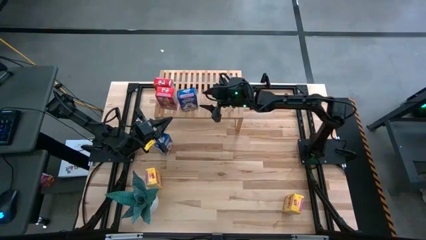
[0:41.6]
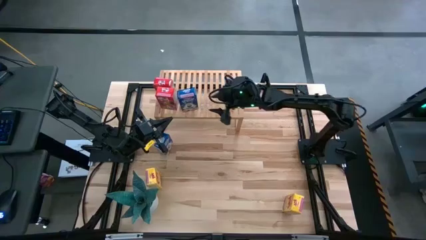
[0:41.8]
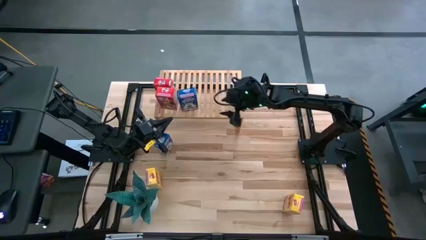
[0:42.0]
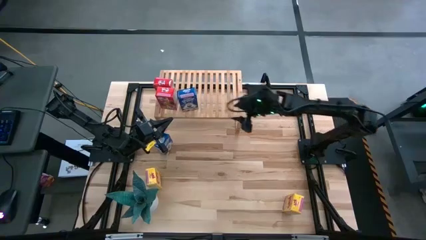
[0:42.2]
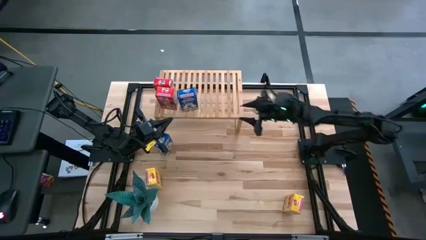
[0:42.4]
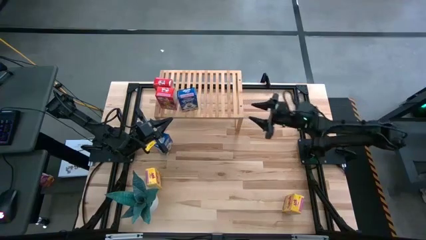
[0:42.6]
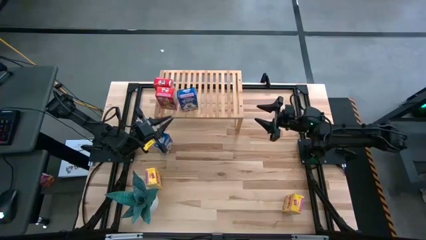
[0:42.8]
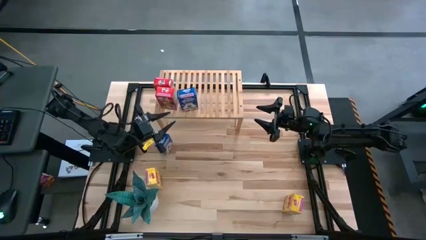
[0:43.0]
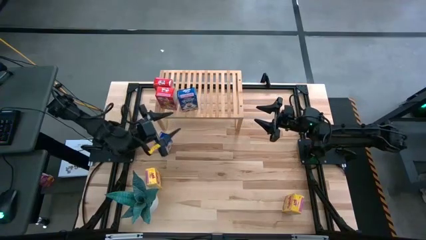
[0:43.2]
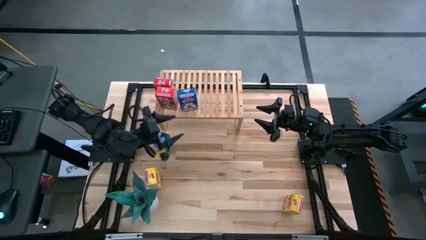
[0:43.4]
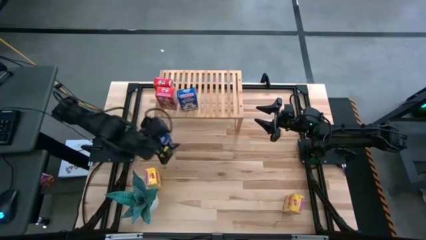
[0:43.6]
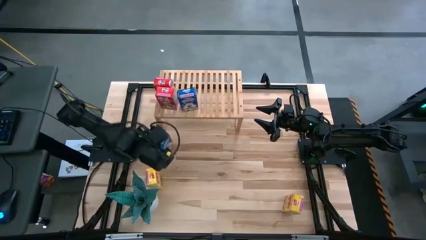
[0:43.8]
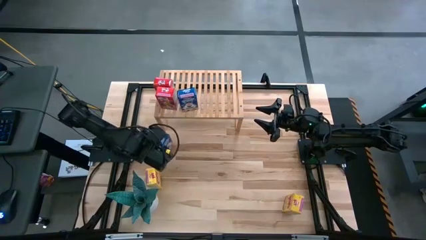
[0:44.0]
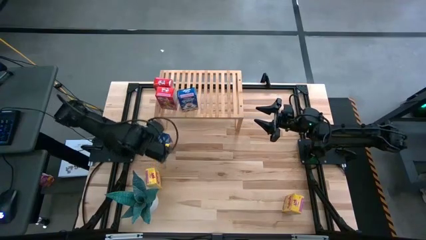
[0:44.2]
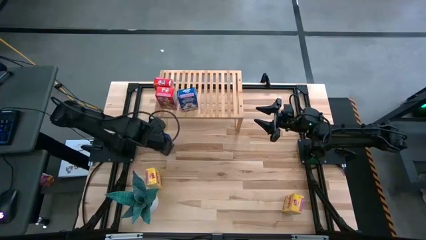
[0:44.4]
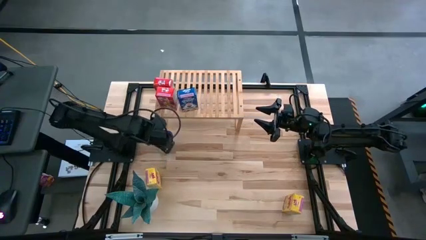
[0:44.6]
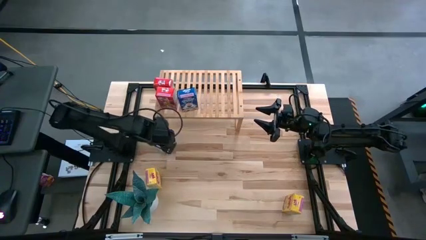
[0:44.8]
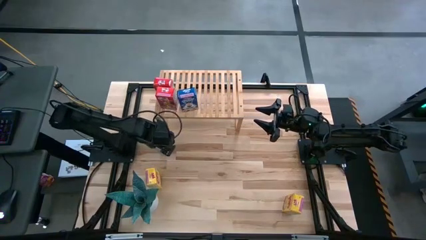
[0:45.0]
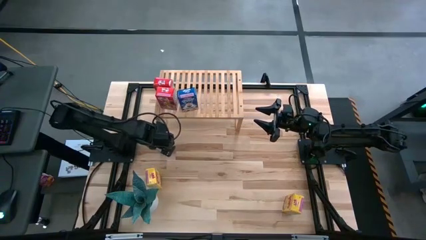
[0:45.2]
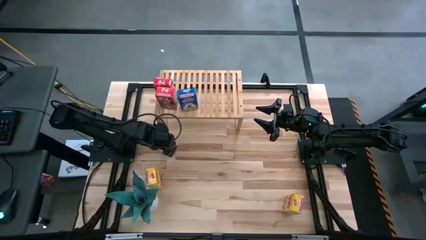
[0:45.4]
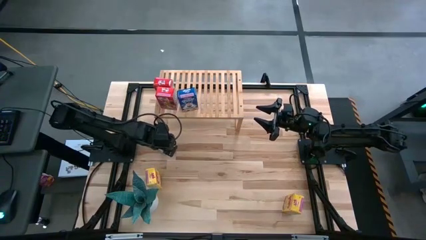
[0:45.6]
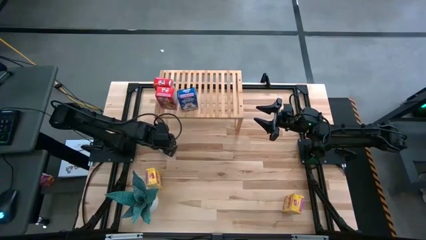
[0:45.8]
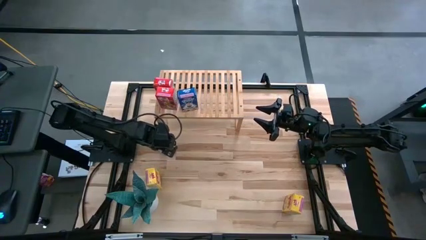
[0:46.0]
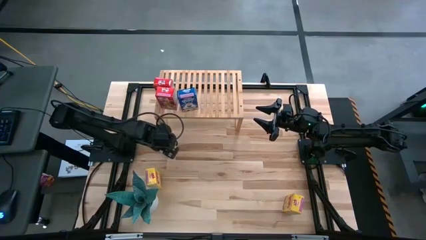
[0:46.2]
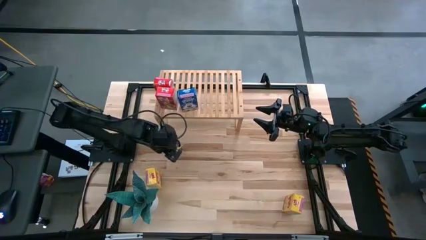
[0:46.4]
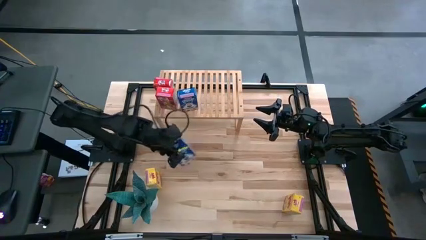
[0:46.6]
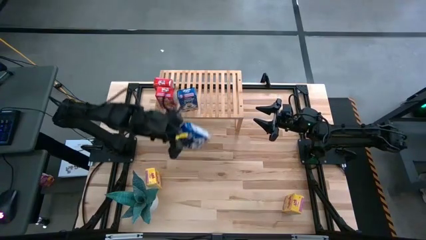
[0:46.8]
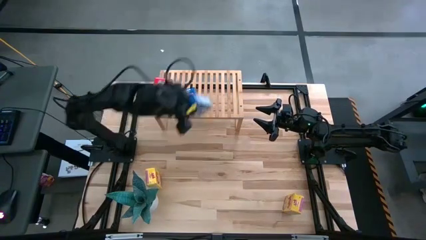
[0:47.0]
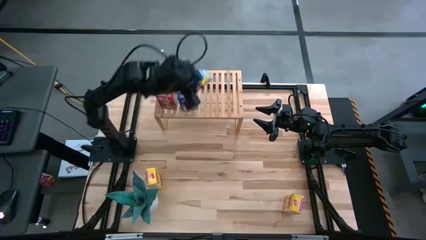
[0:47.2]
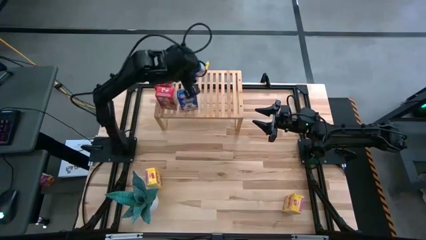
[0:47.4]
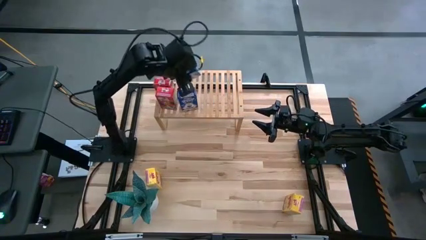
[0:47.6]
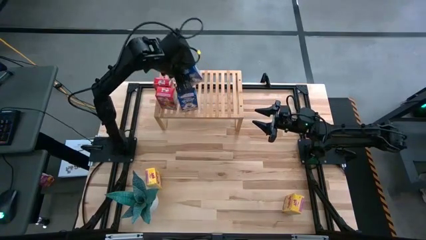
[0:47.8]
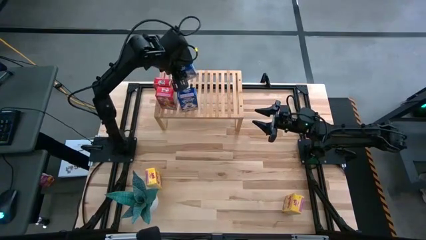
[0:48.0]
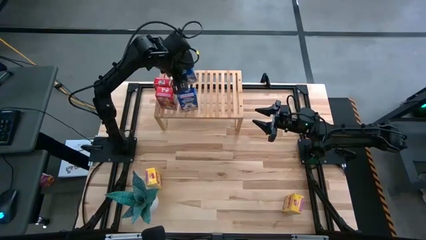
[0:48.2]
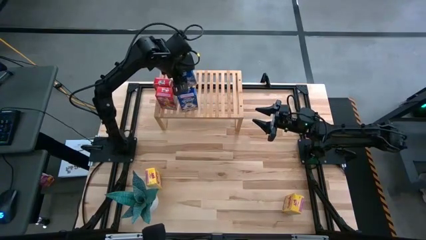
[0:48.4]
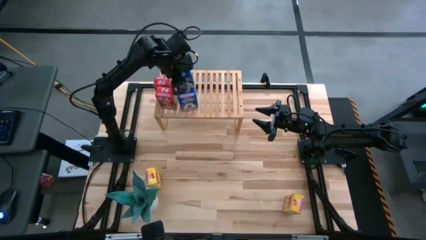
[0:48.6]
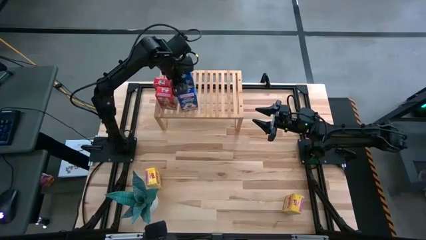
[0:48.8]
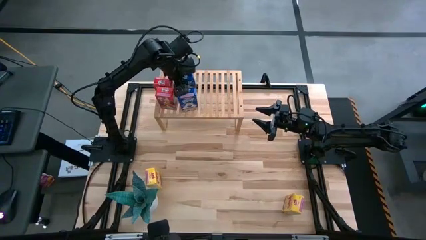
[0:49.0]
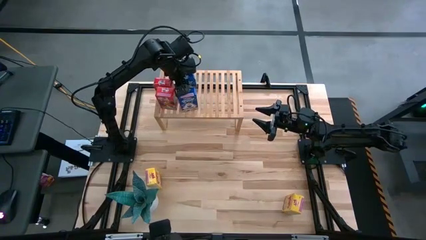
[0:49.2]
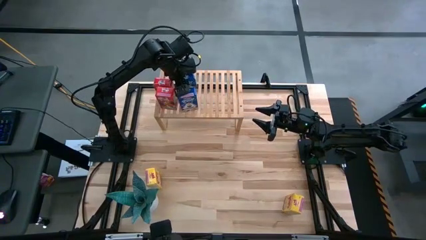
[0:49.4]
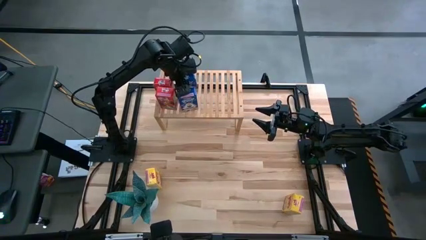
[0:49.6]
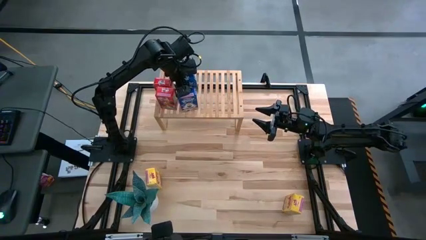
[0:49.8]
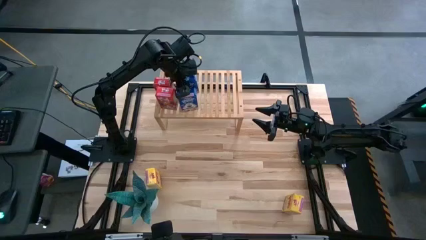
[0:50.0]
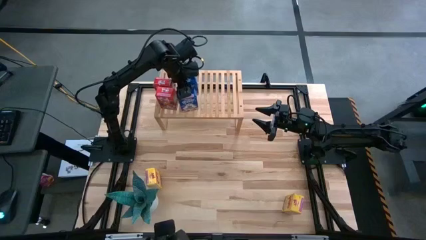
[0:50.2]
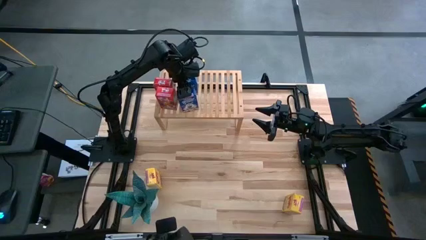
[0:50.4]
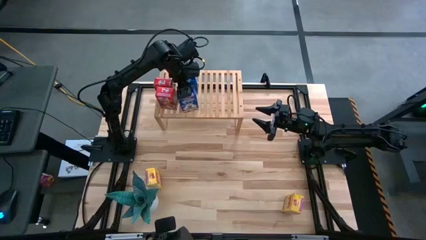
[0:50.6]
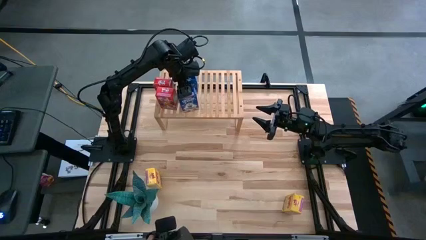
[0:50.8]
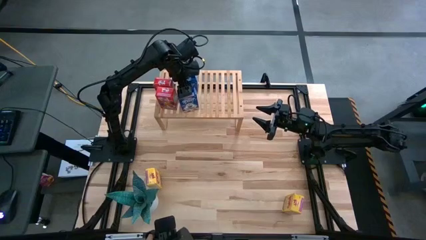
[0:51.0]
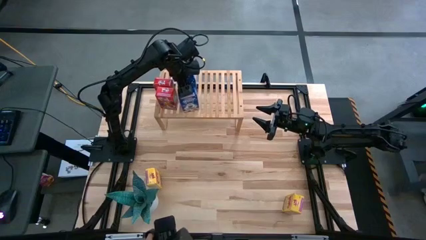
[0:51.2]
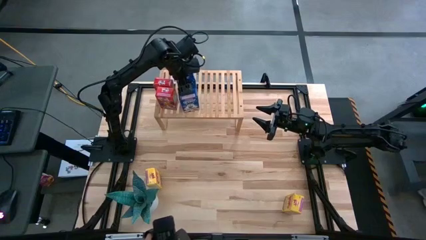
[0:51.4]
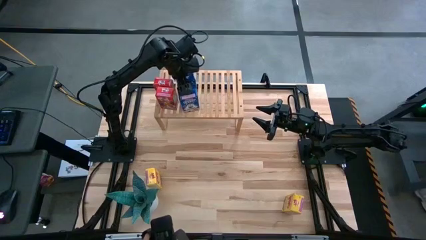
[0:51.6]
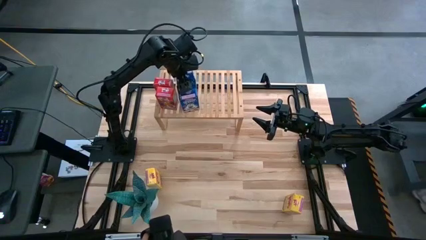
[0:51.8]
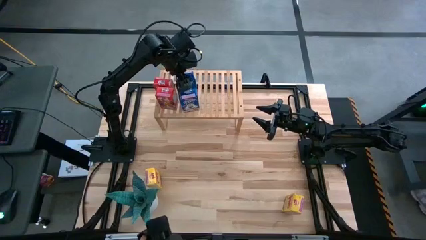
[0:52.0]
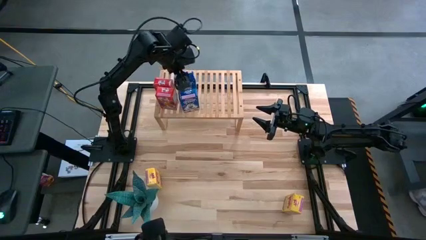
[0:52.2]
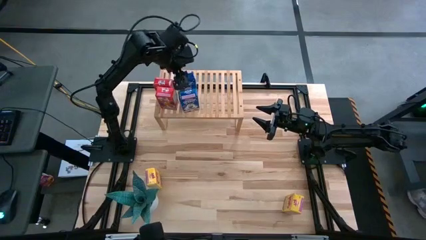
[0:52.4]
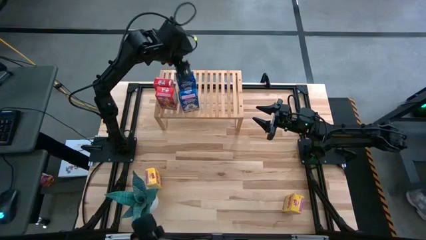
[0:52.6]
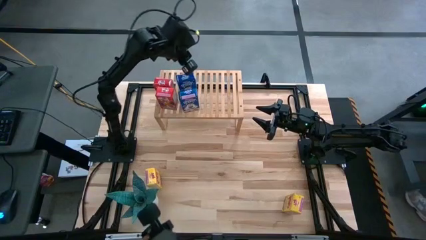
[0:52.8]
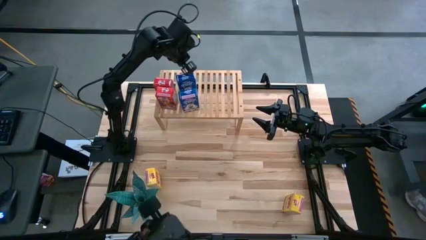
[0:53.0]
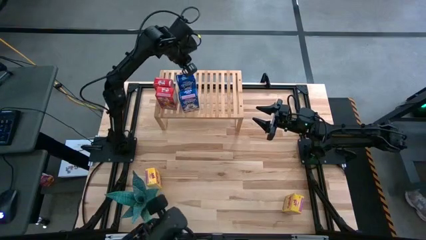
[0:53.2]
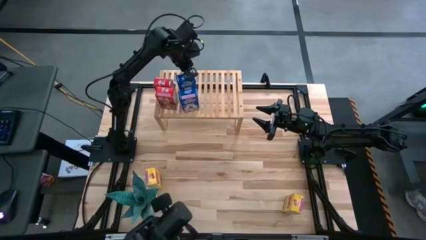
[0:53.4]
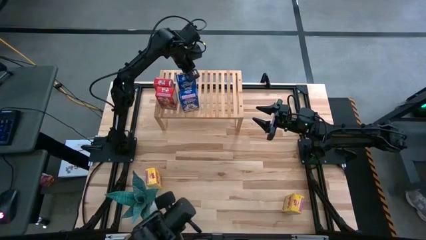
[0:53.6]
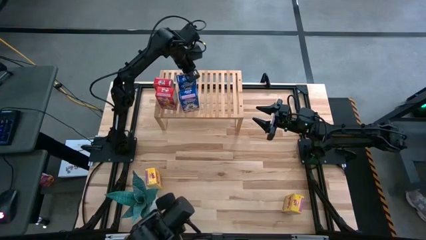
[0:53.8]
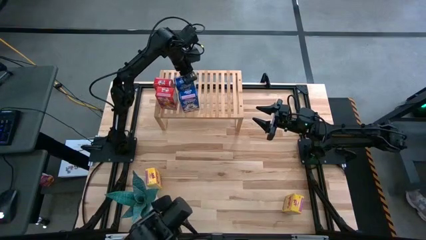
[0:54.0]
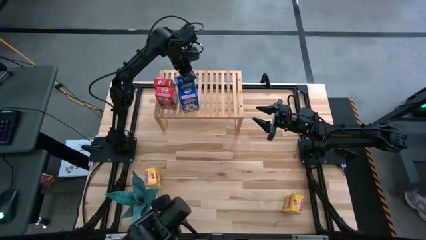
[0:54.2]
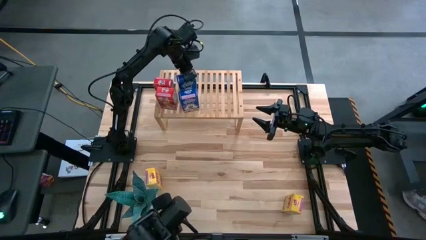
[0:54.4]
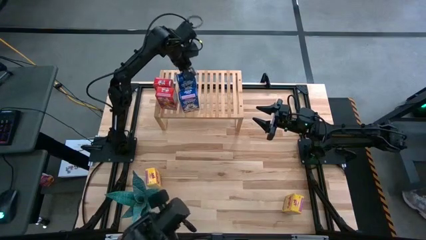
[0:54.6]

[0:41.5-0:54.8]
Task: Stack cereal on shelf
Put the blue cereal box on the shelf aligned with the other blue cereal box
